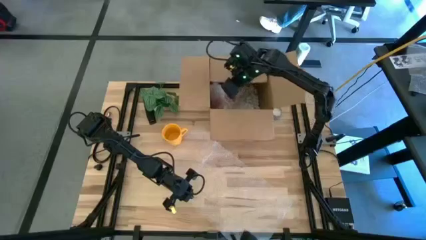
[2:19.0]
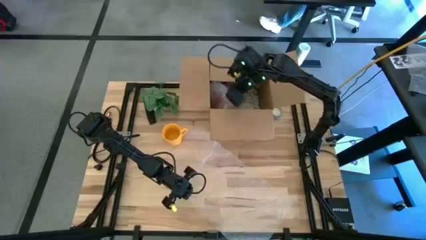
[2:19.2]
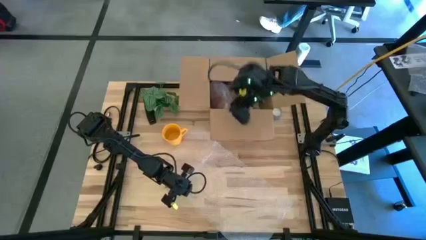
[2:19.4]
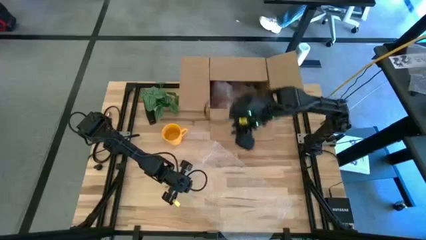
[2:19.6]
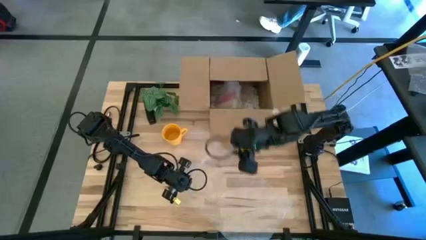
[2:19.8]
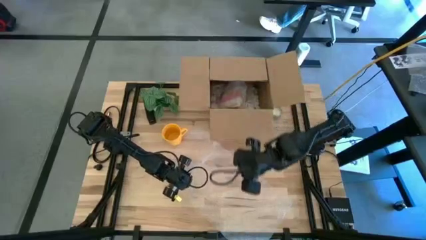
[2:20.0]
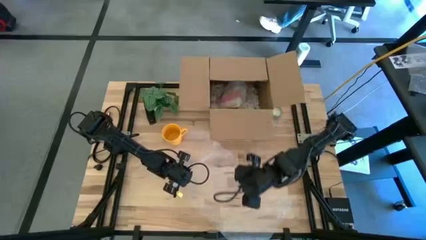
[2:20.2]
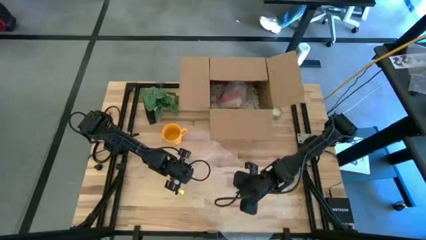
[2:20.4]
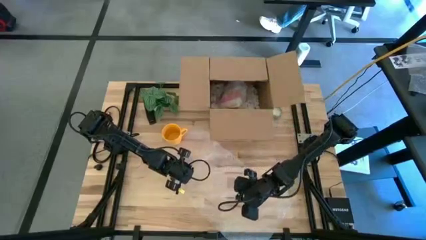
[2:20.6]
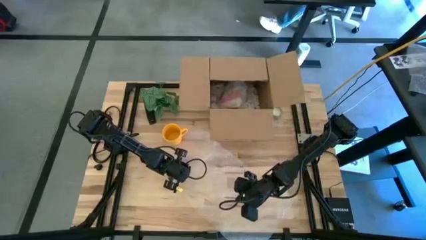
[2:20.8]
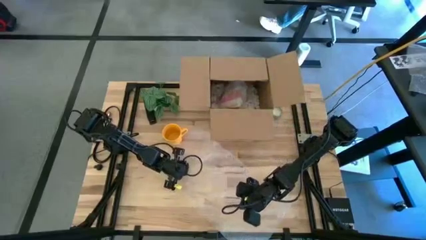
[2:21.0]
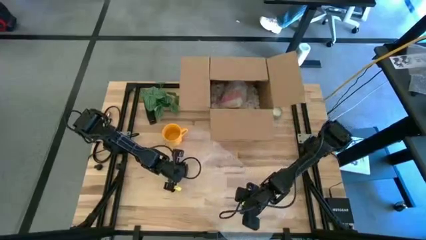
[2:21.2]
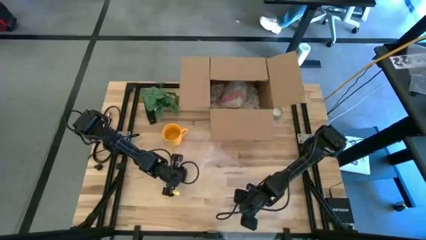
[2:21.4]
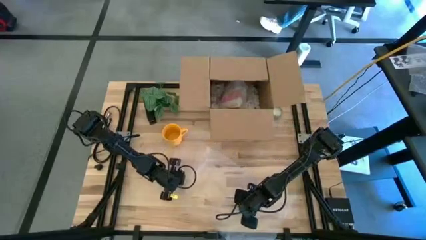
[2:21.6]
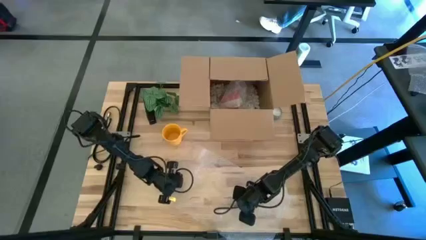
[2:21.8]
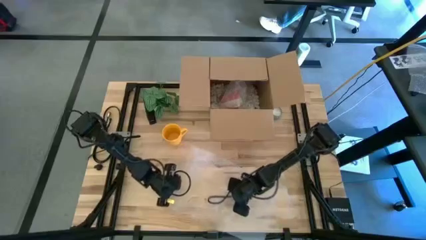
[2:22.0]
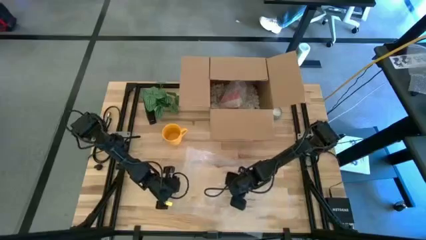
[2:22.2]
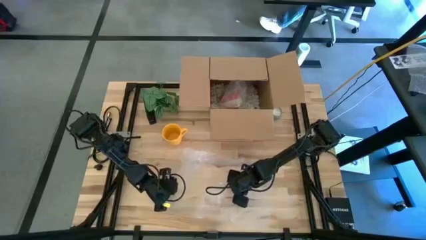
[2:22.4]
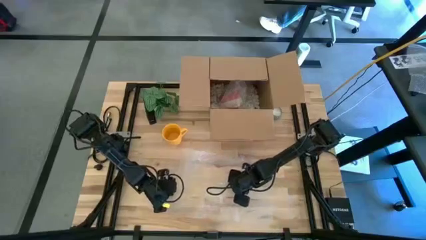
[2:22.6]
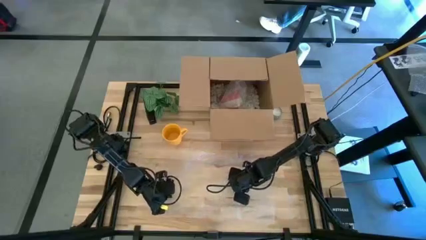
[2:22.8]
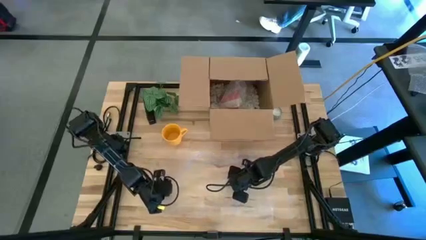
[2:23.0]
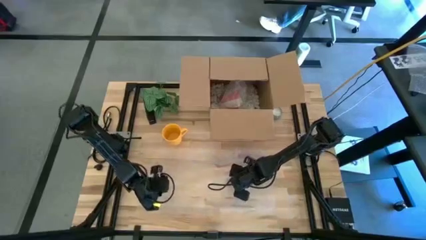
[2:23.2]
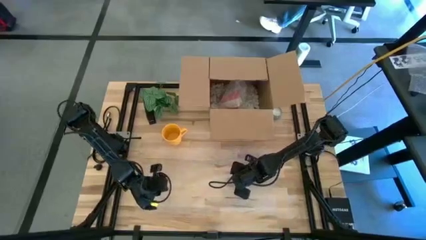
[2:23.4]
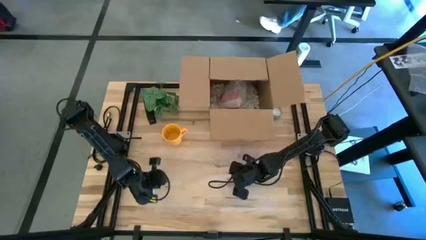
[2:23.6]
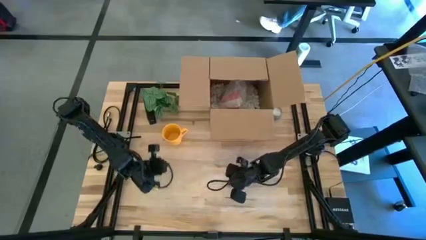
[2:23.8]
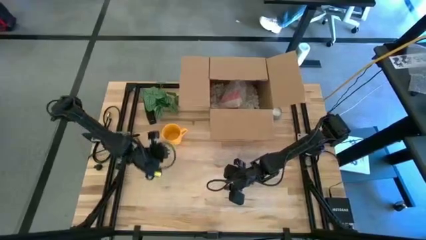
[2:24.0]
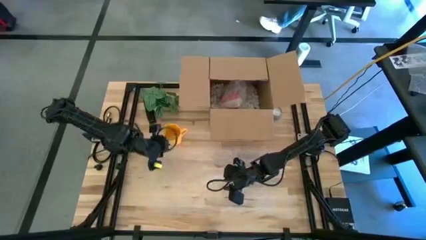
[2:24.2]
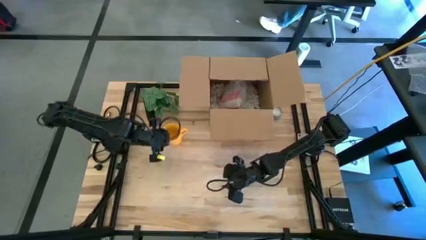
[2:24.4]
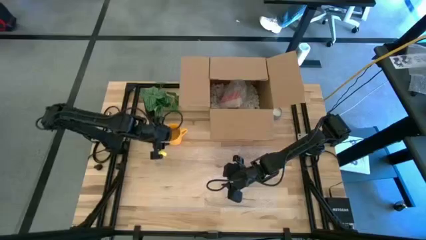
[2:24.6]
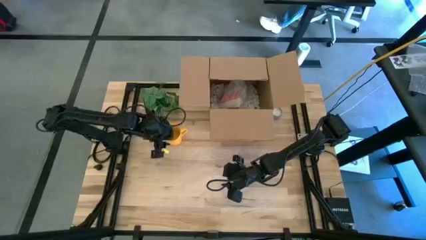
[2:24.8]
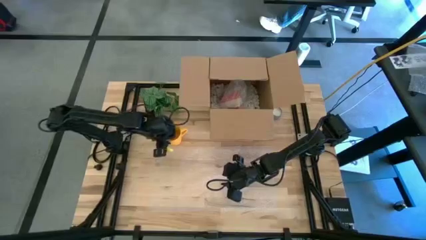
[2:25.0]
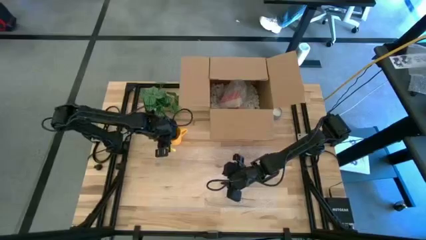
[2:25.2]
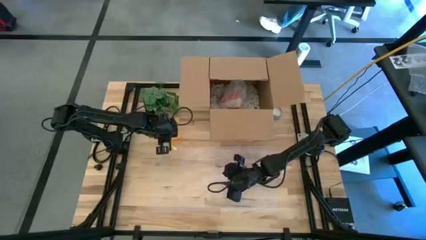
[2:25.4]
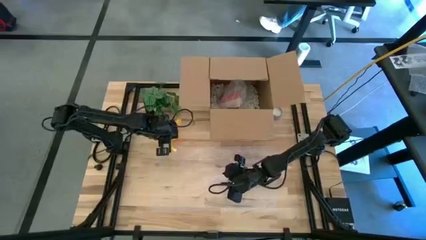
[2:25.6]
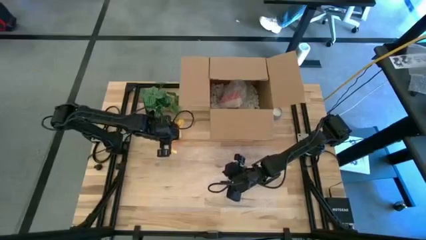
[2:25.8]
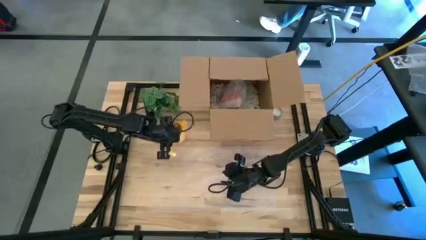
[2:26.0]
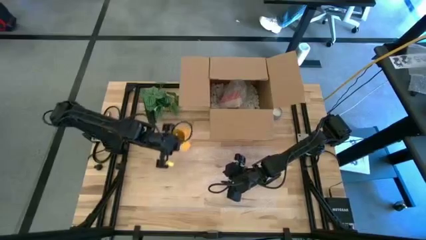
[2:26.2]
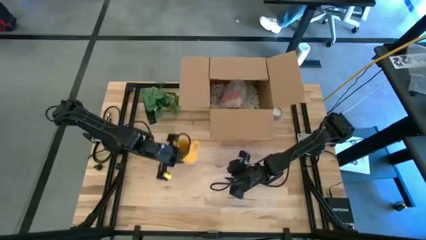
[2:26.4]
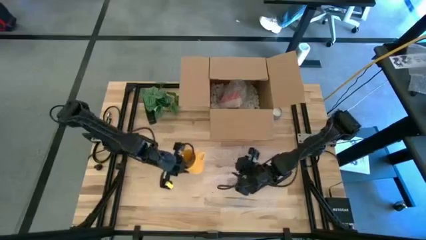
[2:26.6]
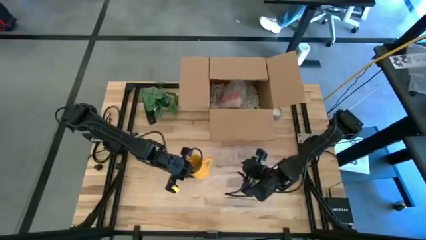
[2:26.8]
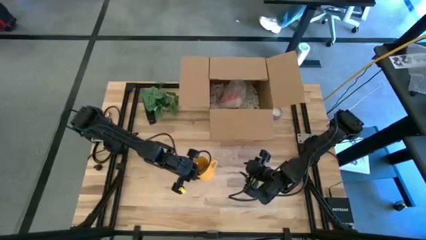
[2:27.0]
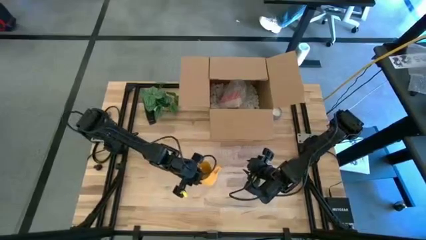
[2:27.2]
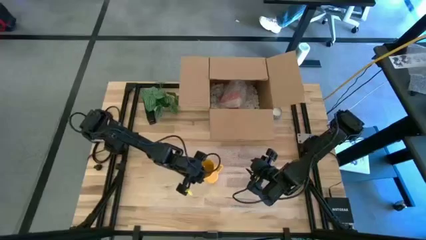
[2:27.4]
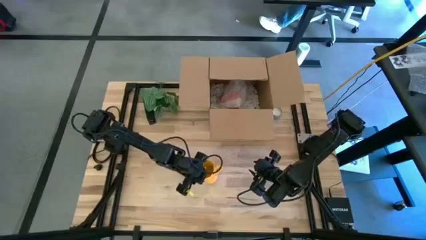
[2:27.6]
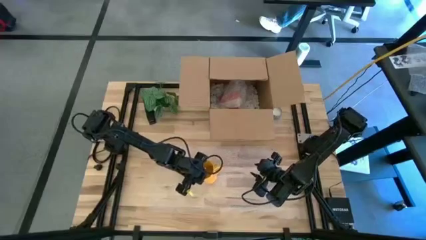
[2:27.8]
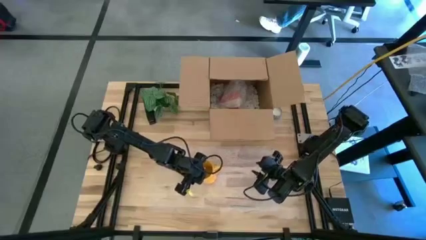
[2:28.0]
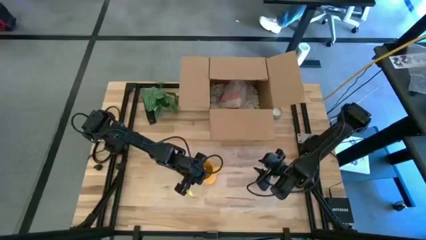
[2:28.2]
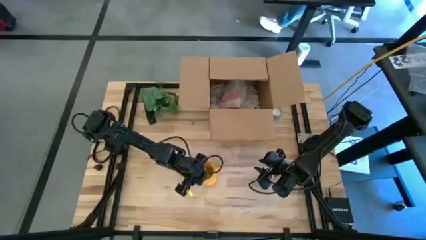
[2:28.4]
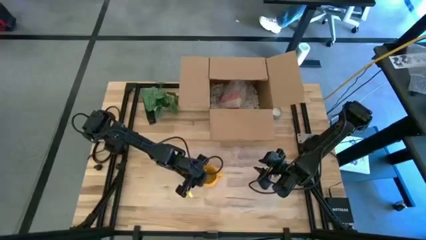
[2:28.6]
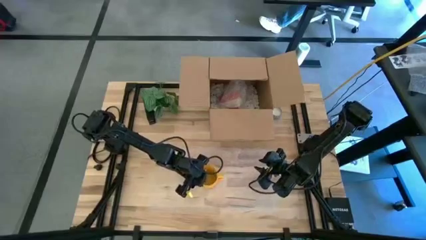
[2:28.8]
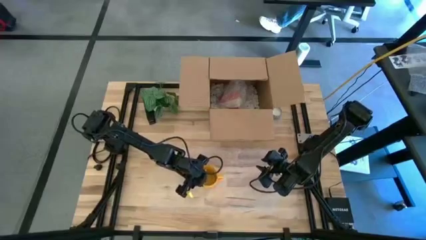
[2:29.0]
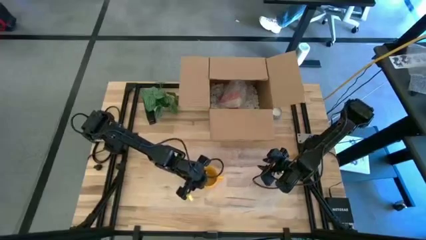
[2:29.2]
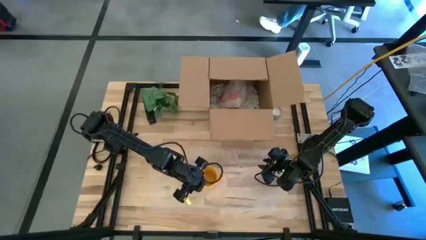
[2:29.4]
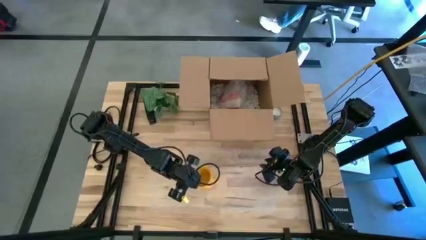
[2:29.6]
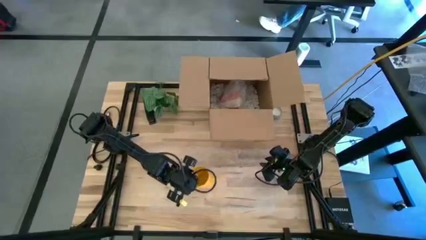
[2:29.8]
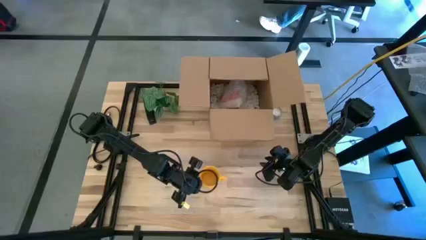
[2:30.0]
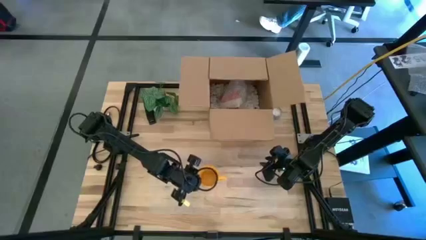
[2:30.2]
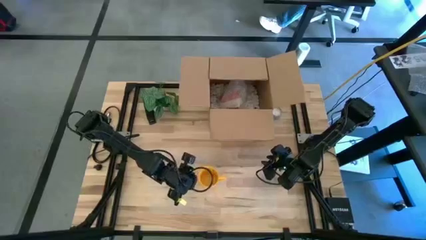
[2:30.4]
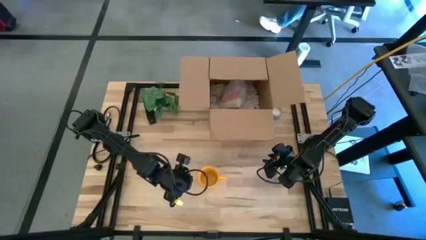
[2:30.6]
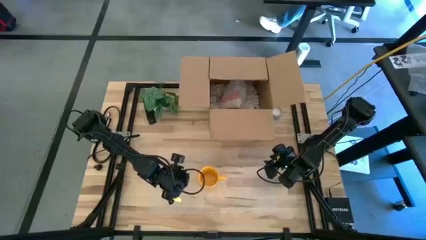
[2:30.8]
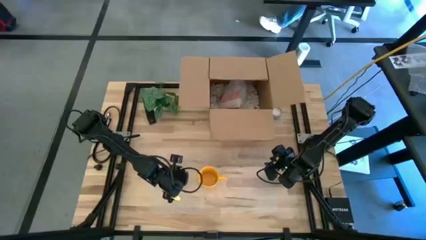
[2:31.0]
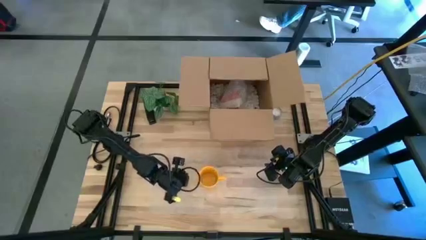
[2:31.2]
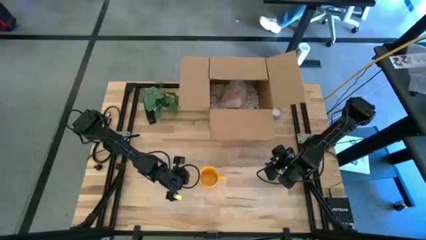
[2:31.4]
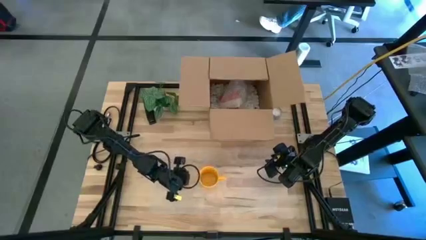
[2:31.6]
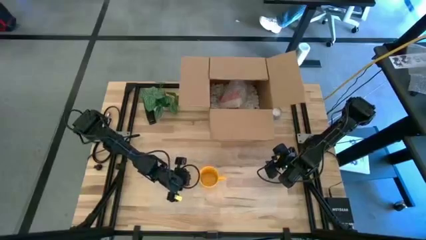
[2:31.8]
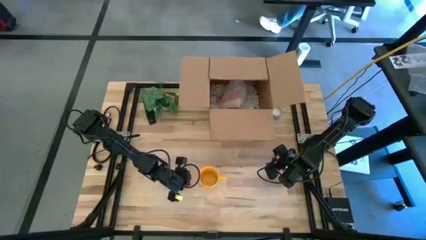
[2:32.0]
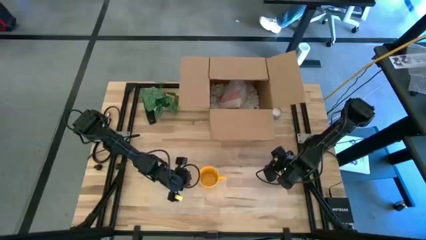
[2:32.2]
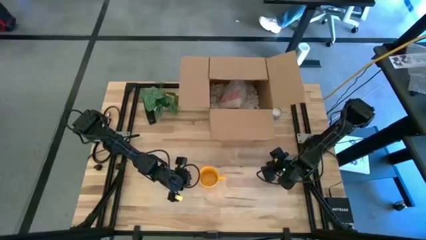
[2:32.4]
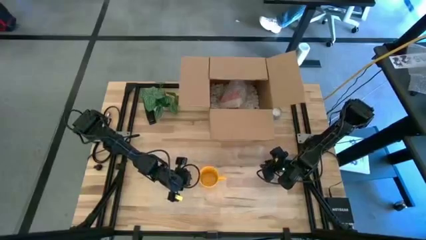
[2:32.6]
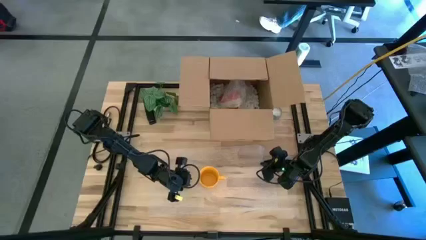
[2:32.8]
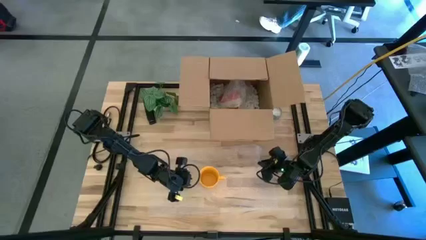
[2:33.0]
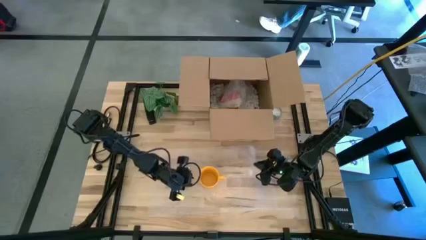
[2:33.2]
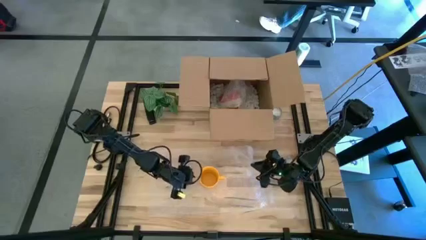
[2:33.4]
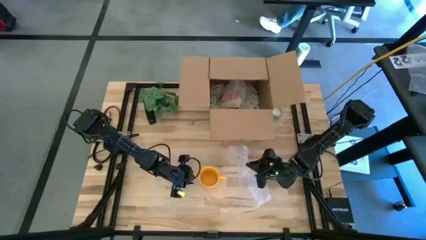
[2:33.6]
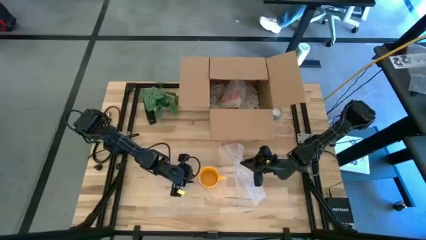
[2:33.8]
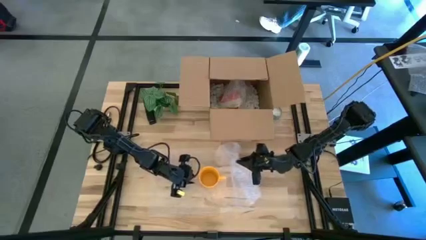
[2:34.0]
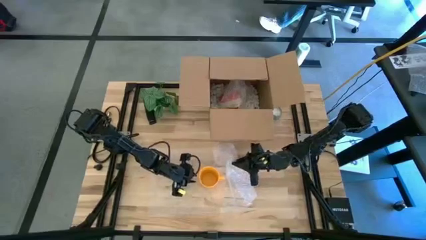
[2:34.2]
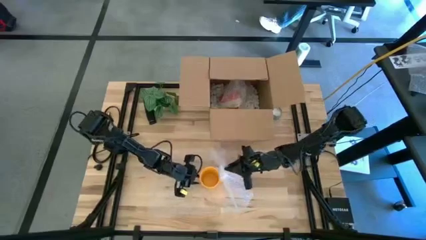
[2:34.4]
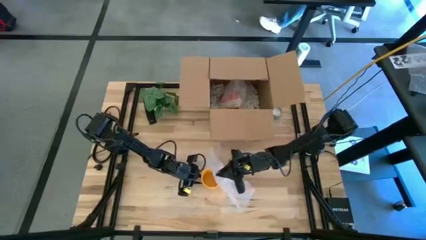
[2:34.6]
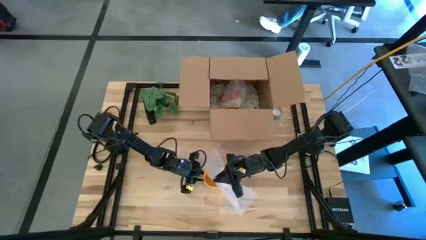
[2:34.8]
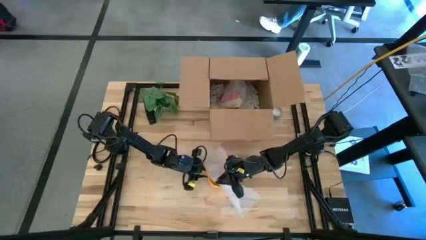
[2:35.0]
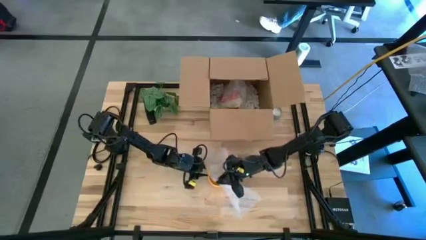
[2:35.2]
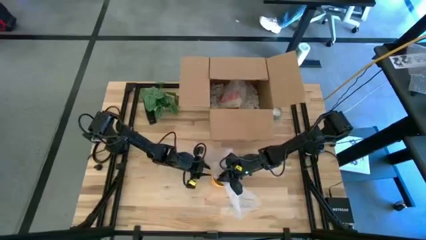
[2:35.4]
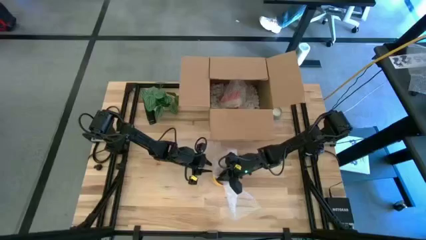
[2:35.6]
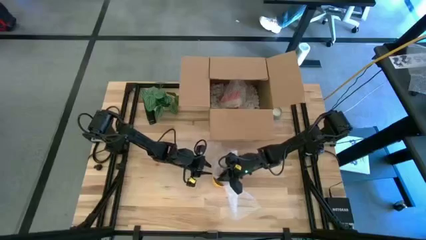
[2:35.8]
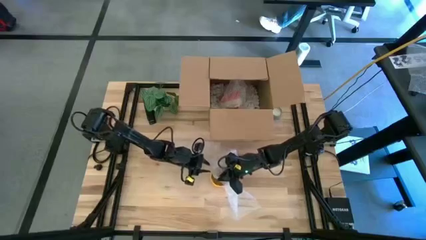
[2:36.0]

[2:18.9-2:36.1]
Task: wrap mug
Wrap the yellow mug with the bubble wrap
